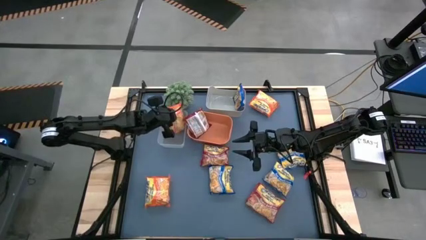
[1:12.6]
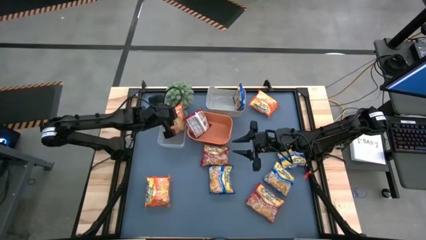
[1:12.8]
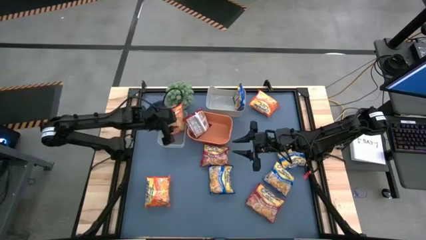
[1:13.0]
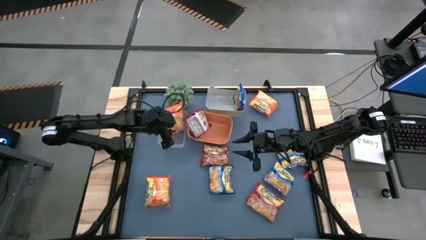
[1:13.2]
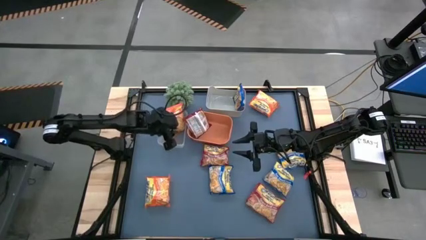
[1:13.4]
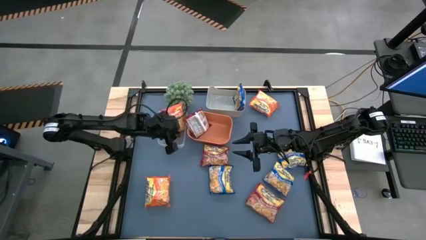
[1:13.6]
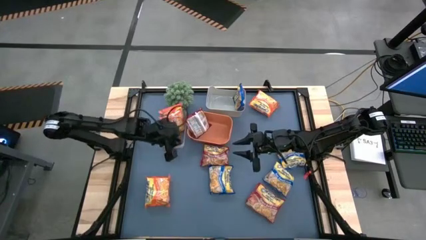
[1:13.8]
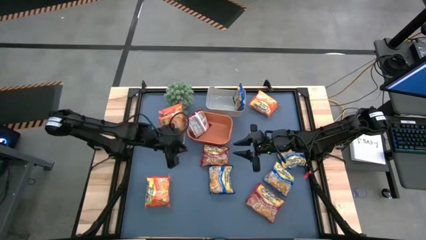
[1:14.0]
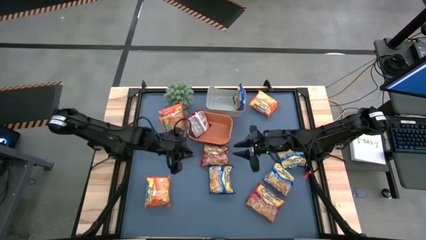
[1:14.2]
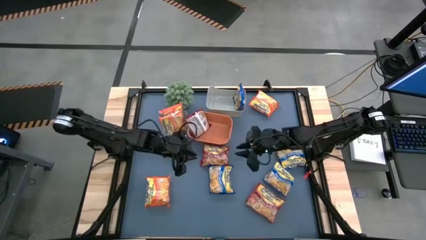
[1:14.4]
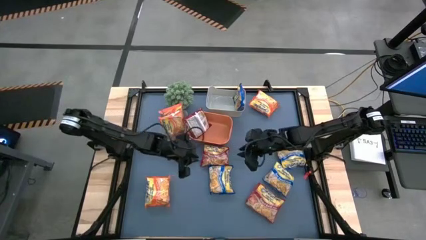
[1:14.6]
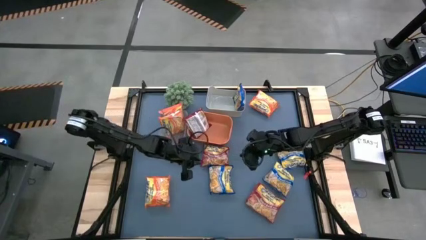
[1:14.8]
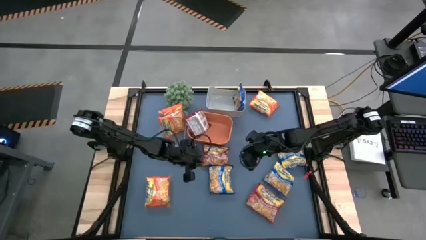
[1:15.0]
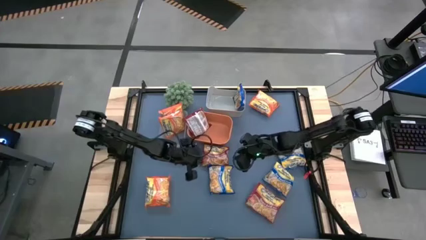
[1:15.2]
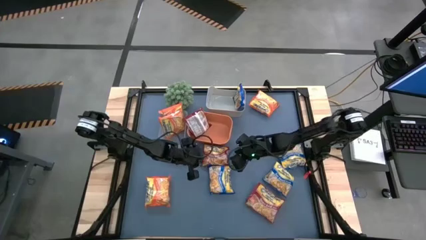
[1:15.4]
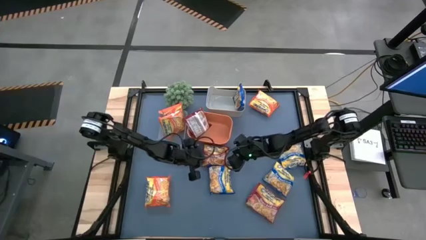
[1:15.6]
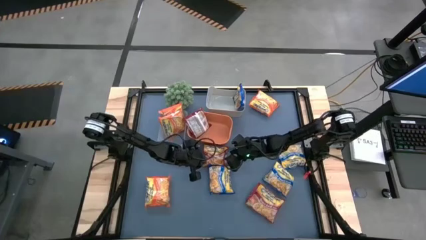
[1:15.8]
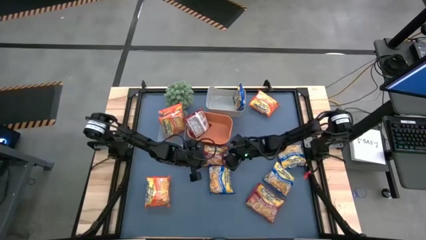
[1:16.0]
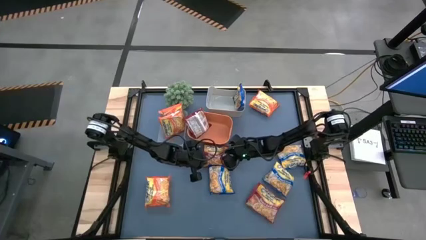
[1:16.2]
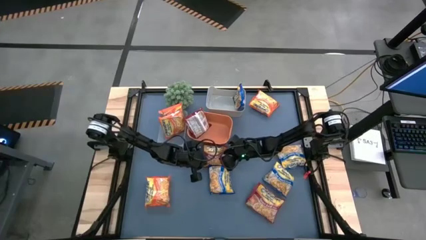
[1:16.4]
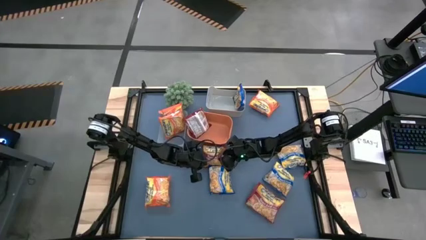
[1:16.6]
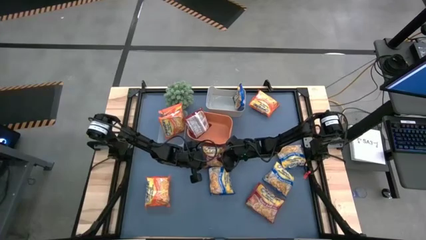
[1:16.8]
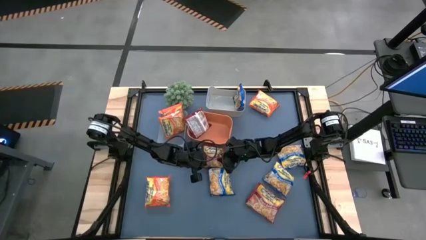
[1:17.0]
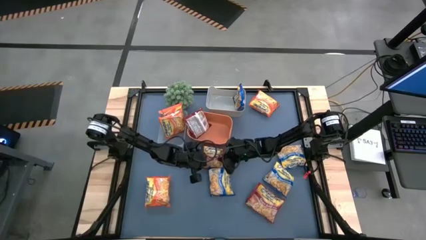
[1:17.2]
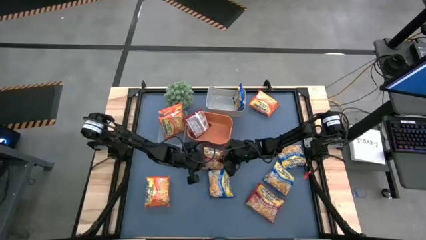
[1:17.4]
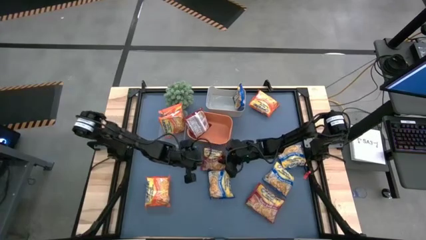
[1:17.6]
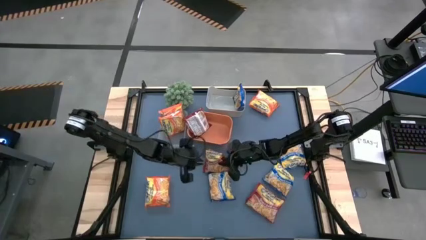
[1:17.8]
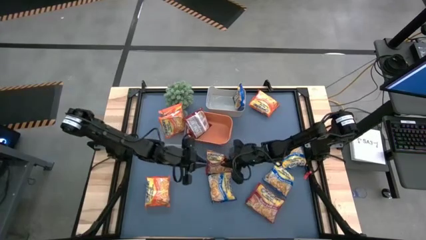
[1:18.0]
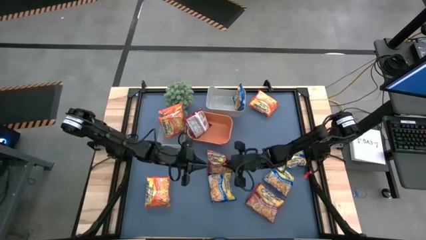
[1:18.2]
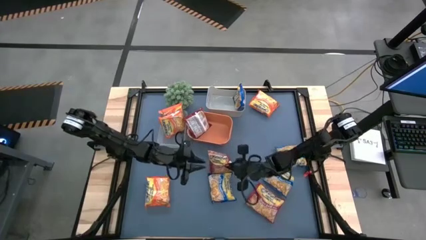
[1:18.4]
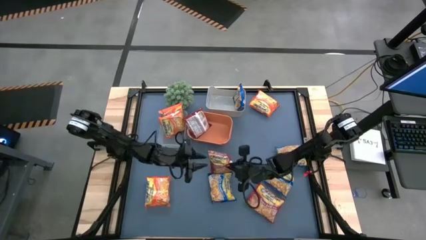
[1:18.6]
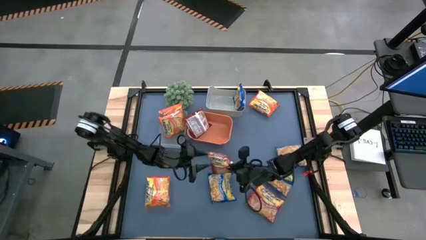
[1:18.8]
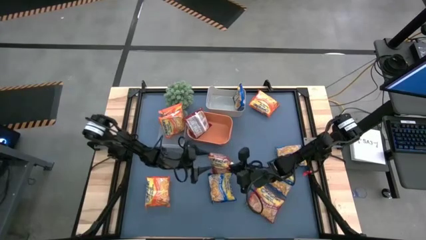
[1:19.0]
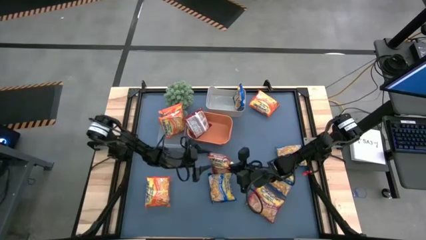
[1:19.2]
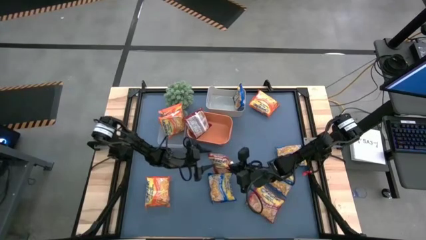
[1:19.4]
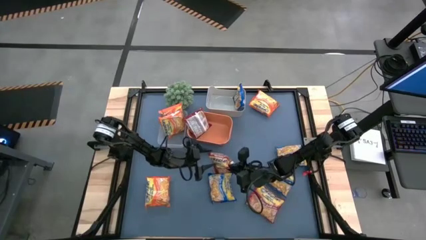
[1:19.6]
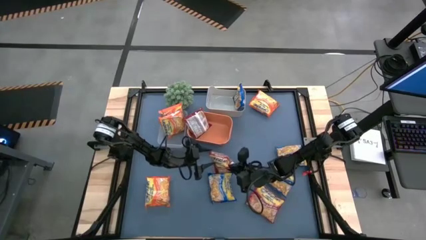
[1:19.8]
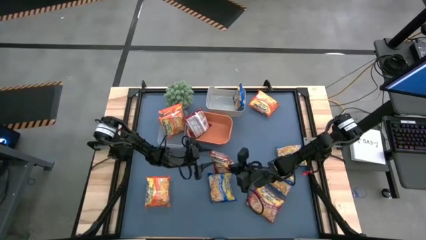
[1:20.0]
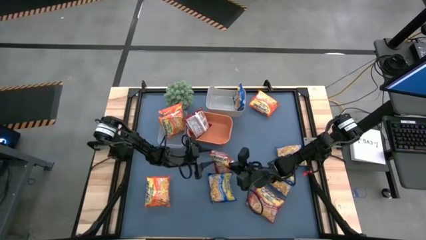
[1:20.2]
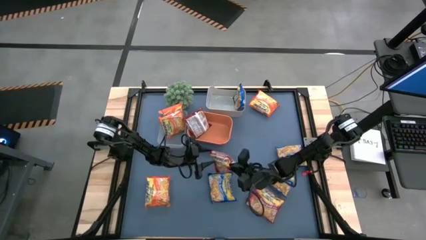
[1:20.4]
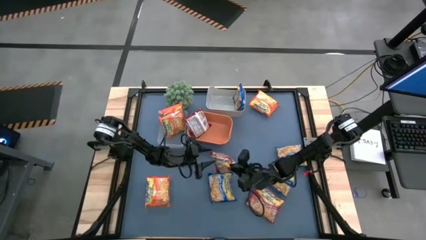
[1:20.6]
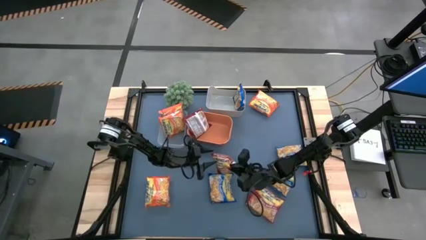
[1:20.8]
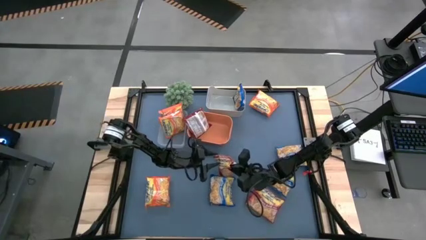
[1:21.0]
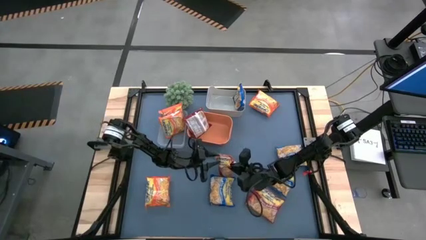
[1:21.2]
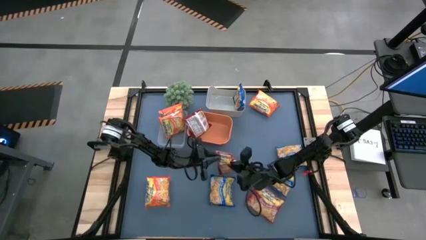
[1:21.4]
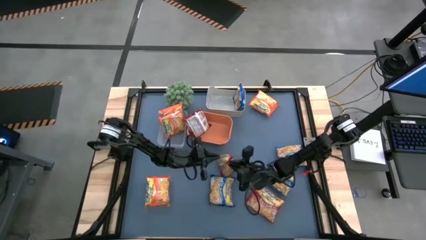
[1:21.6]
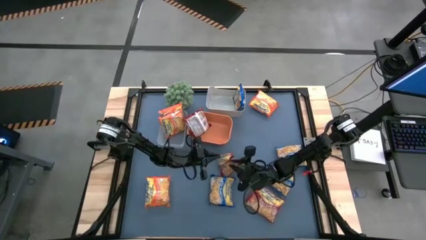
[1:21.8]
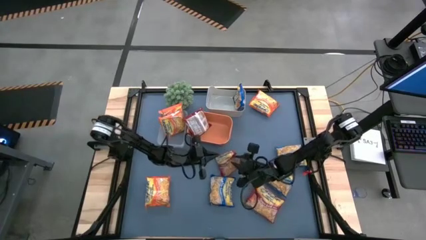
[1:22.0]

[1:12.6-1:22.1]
Task: Sort Maruchan noodles
Put the red noodle pack into the orange bin

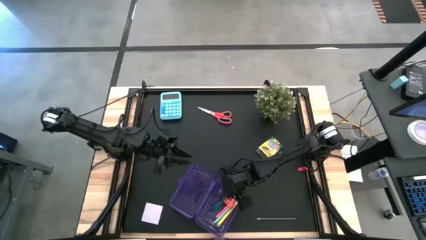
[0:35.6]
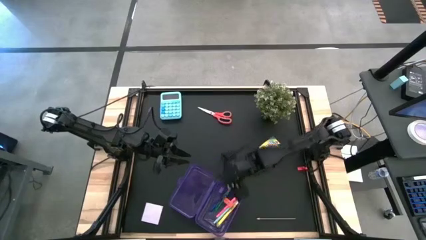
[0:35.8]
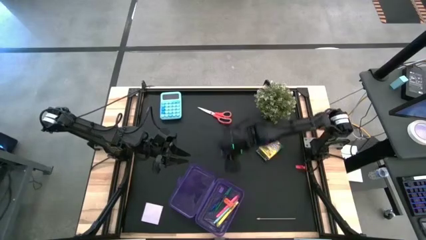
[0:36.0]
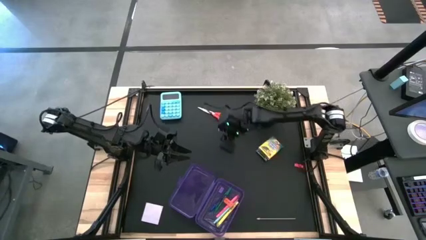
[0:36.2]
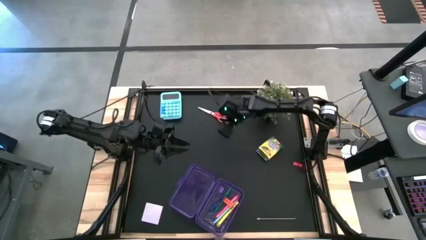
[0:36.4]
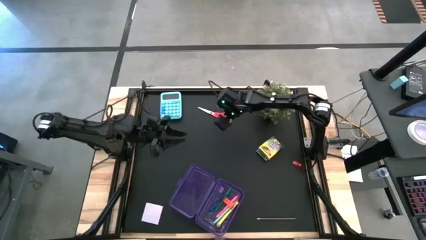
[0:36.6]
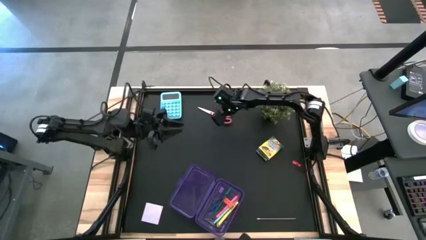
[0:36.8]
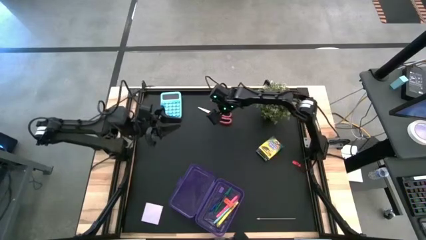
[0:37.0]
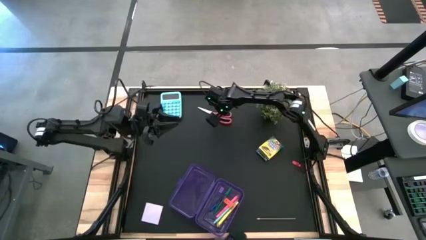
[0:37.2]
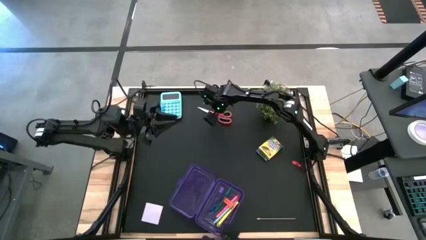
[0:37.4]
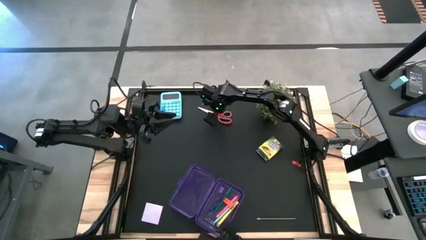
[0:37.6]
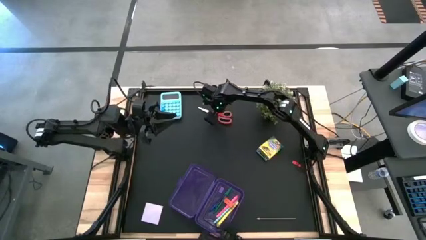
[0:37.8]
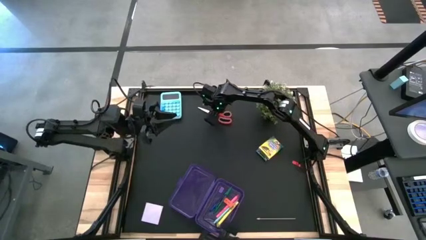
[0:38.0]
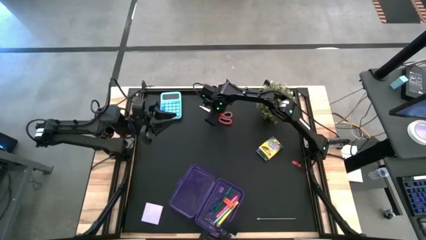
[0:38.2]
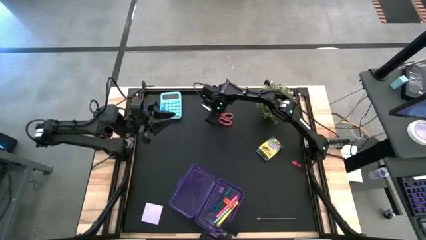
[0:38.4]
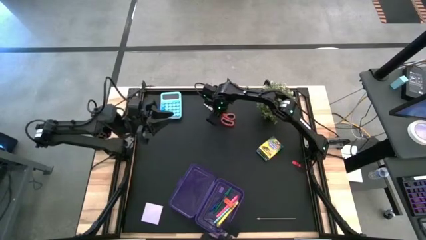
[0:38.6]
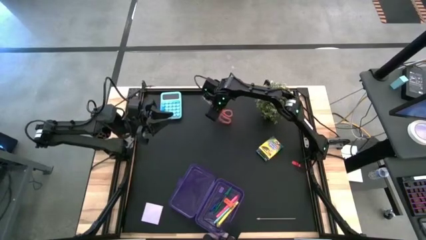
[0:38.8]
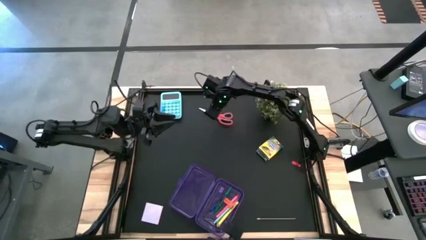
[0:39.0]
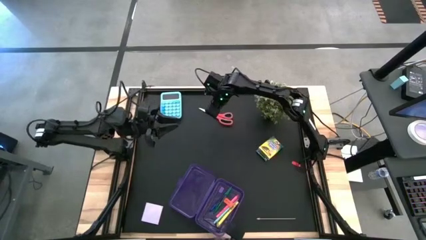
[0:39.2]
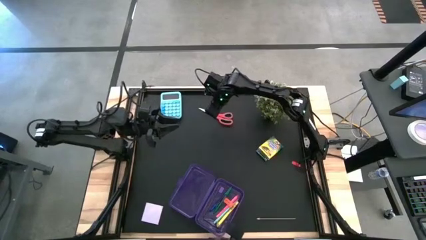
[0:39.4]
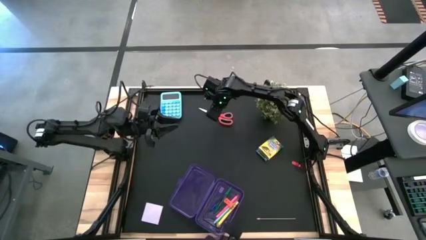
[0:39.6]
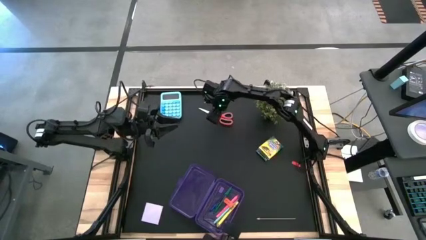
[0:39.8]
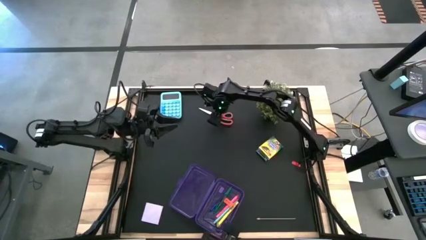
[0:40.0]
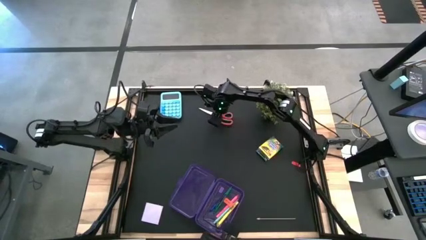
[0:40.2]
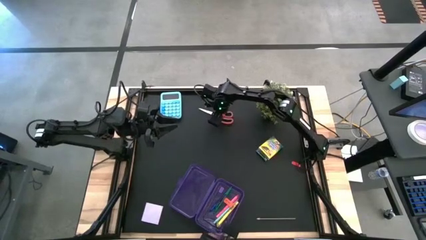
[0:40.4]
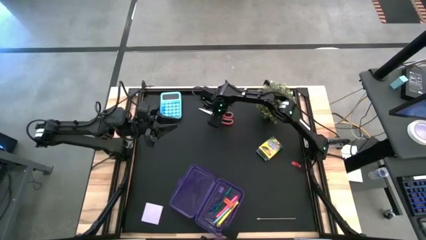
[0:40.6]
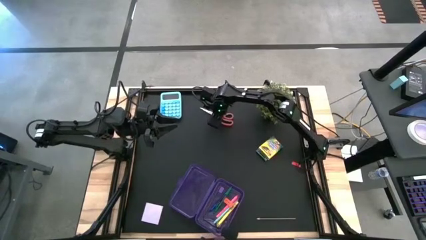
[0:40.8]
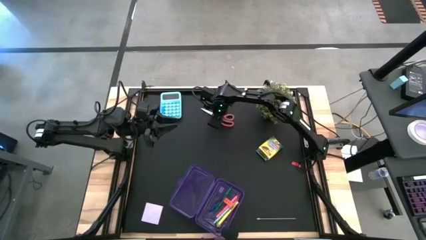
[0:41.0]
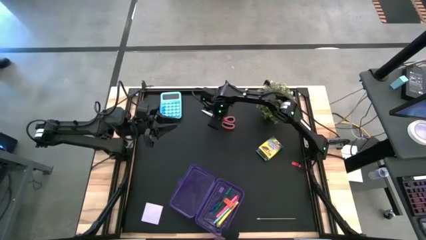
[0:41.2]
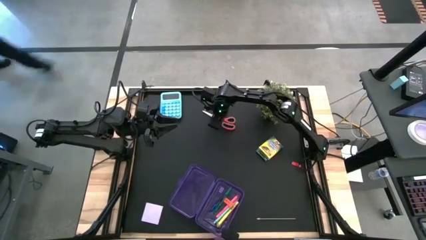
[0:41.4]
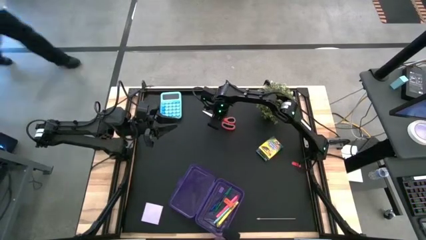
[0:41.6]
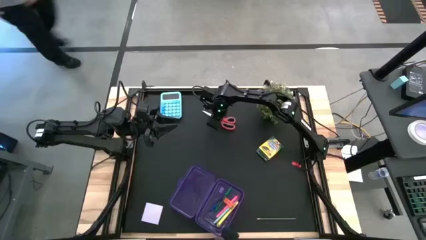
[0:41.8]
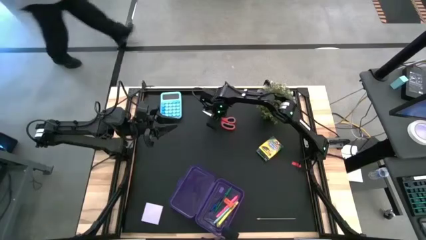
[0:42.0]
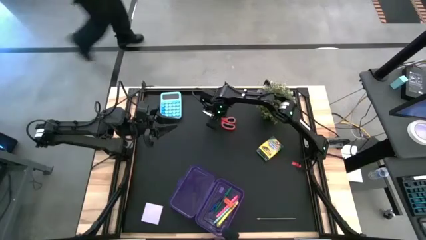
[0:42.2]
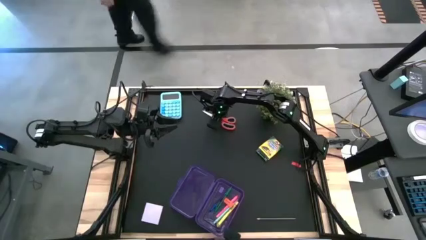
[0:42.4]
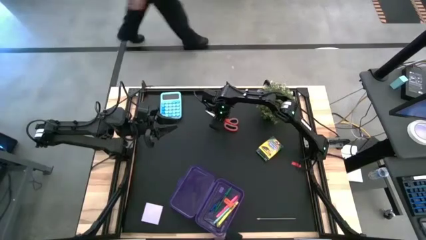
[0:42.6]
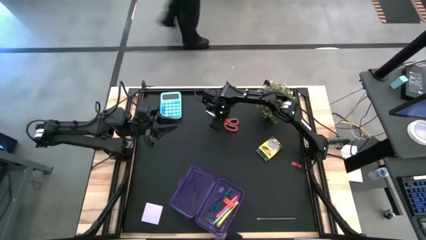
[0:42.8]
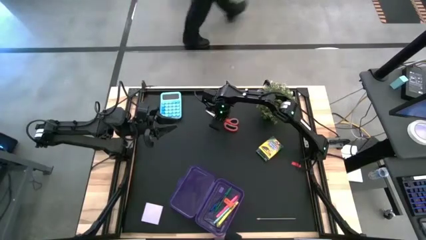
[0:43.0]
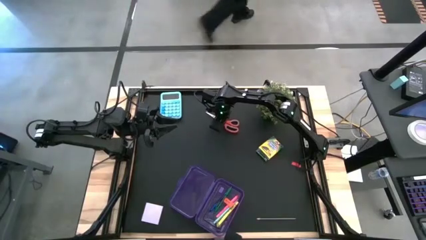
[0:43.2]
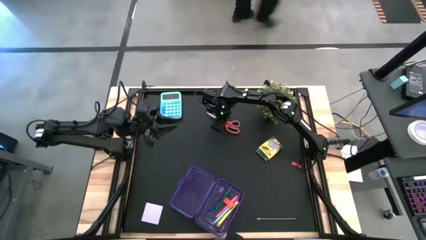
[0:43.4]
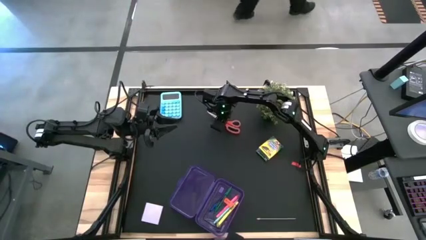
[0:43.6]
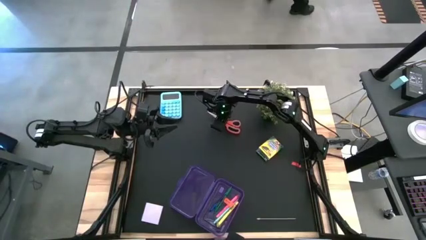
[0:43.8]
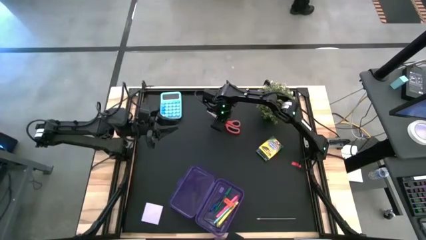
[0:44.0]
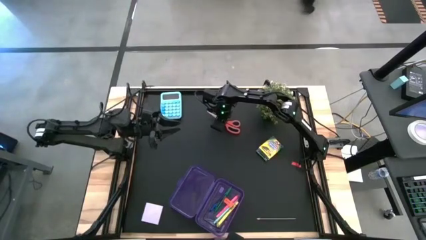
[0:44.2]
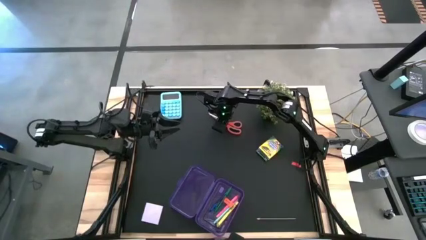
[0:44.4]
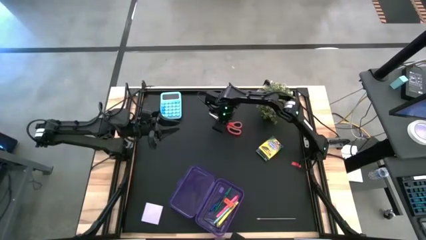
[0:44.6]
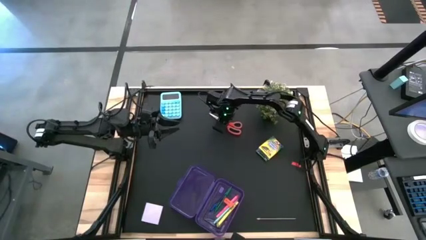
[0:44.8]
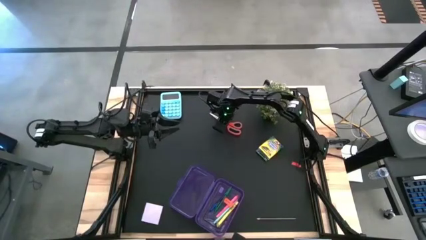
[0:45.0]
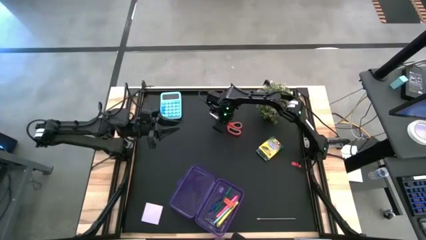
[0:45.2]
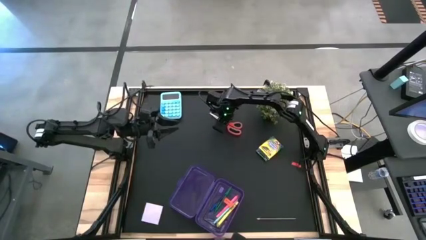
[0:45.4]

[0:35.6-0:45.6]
Task: Pack school essentials
Put the scissors into the purple supply box
